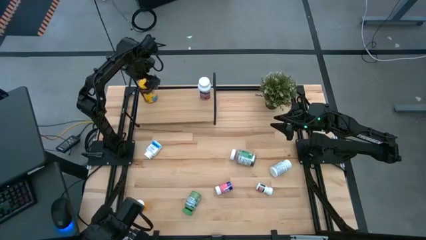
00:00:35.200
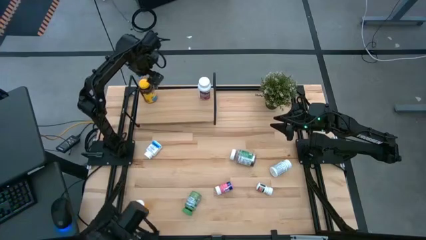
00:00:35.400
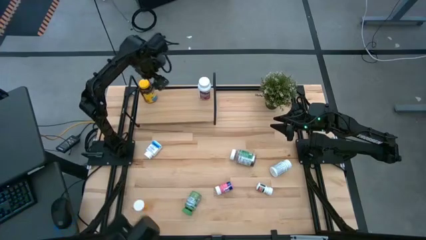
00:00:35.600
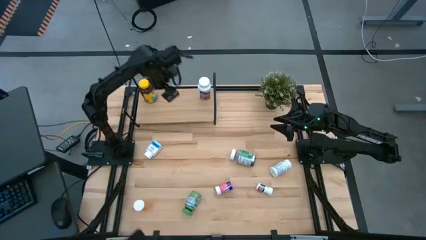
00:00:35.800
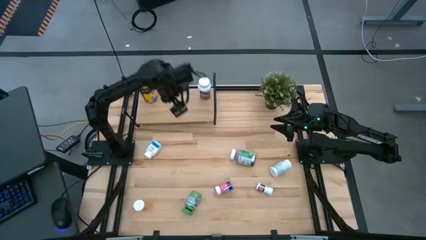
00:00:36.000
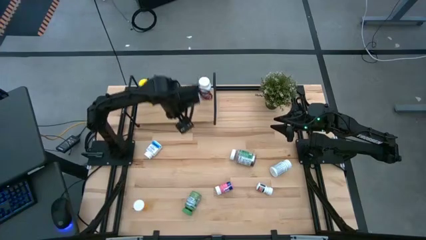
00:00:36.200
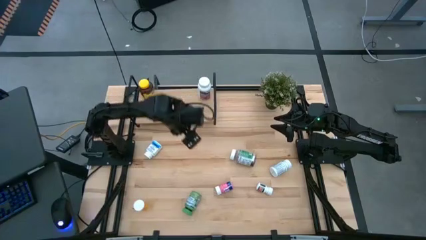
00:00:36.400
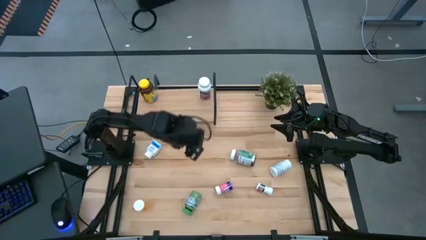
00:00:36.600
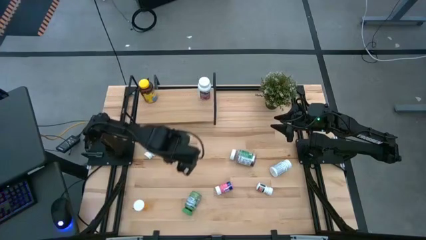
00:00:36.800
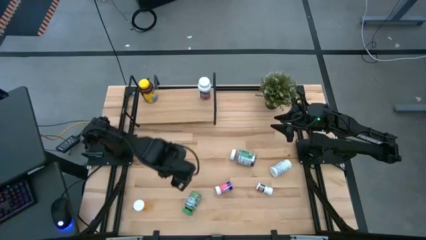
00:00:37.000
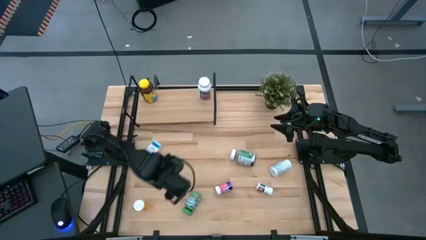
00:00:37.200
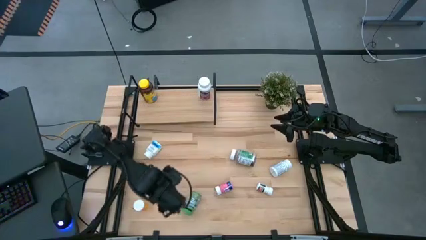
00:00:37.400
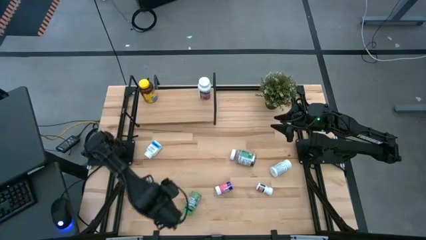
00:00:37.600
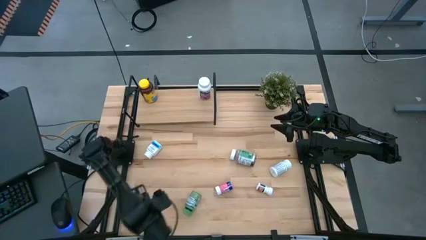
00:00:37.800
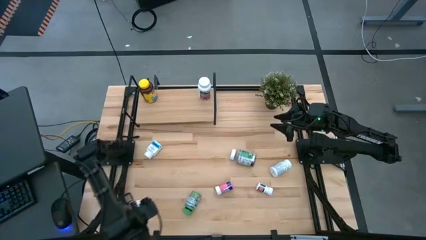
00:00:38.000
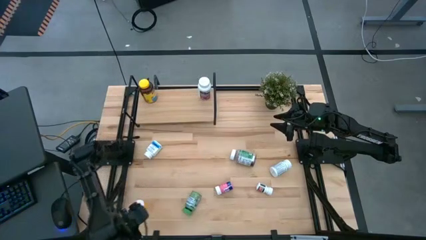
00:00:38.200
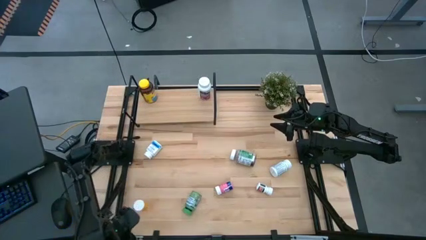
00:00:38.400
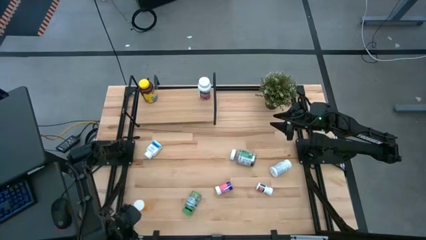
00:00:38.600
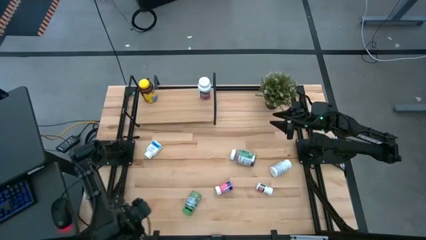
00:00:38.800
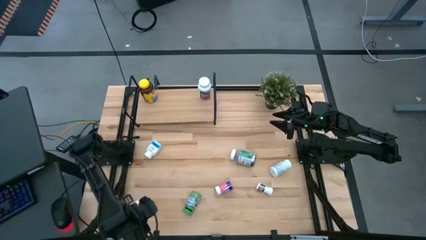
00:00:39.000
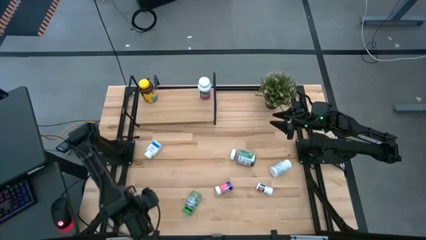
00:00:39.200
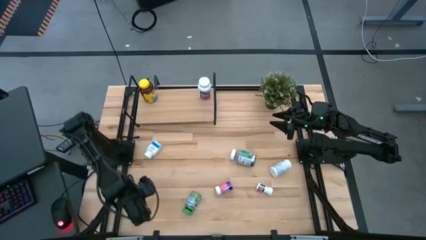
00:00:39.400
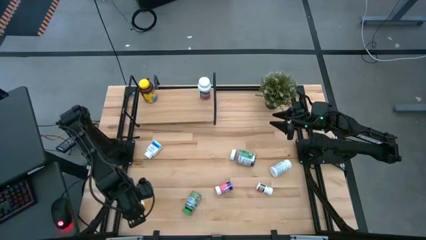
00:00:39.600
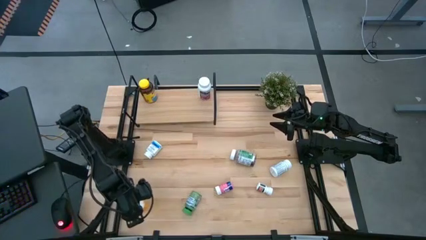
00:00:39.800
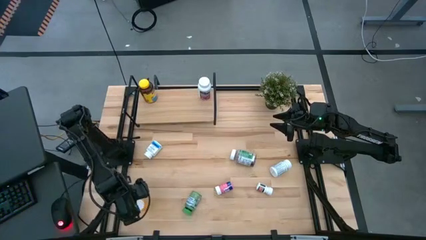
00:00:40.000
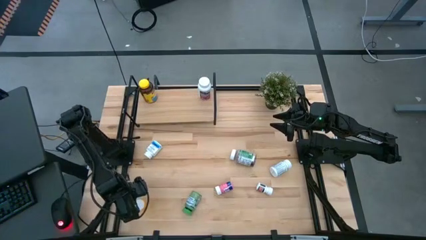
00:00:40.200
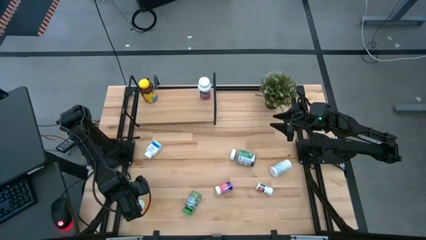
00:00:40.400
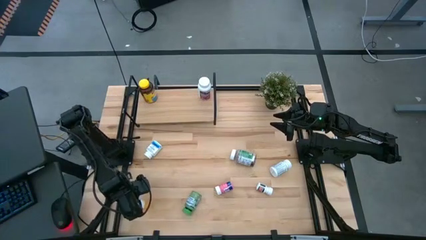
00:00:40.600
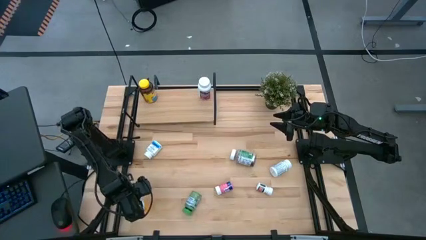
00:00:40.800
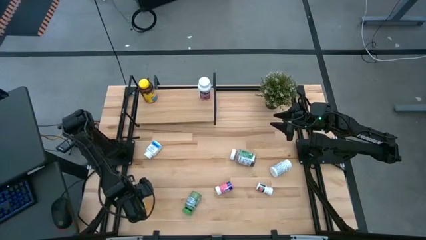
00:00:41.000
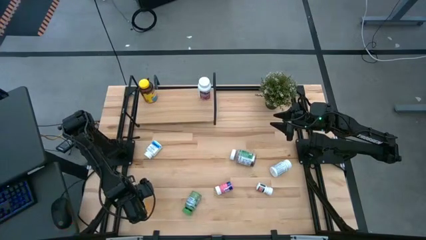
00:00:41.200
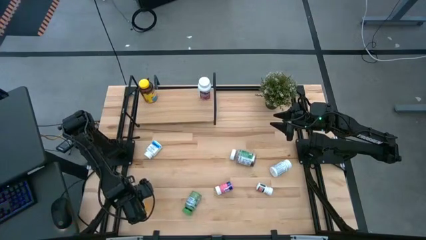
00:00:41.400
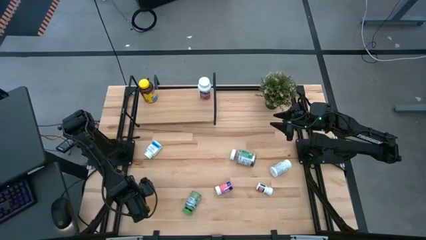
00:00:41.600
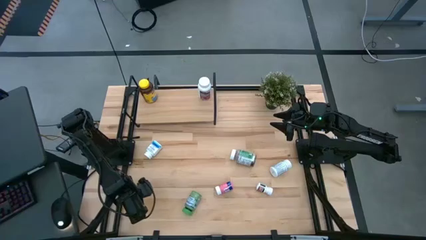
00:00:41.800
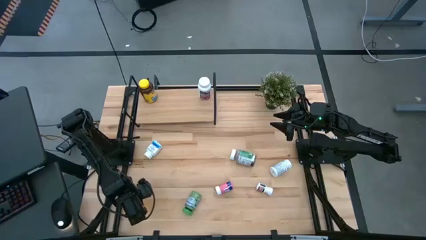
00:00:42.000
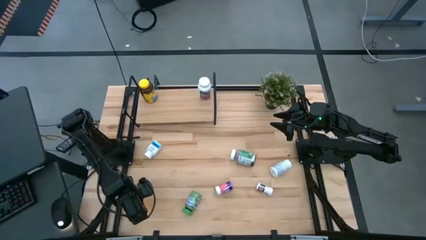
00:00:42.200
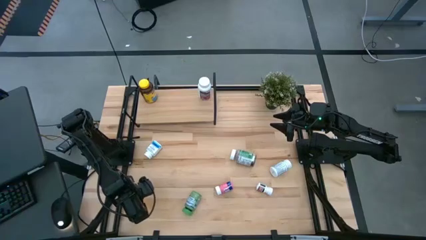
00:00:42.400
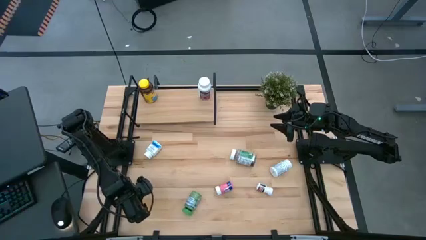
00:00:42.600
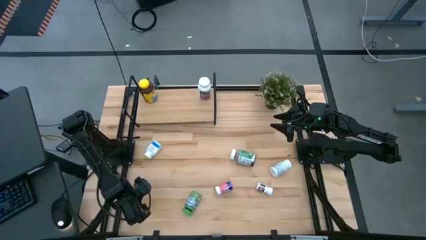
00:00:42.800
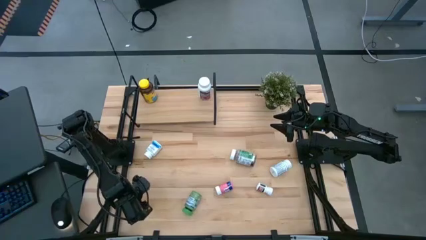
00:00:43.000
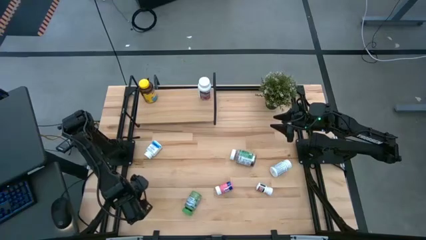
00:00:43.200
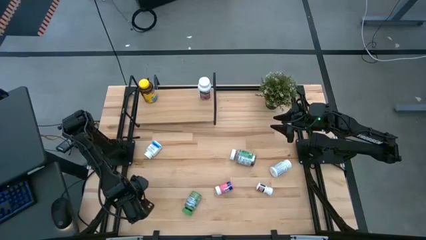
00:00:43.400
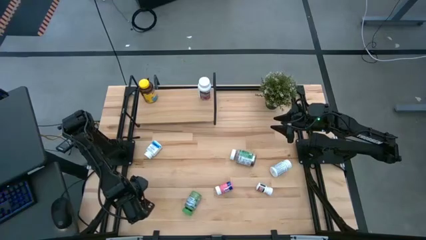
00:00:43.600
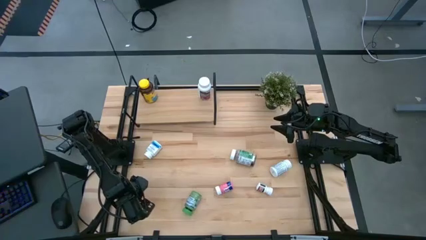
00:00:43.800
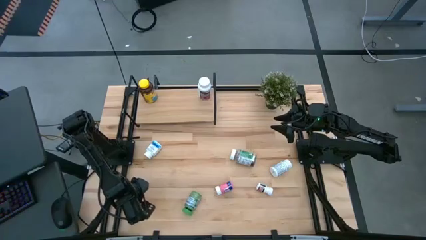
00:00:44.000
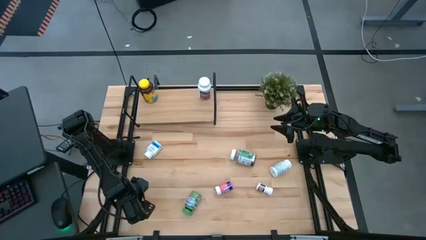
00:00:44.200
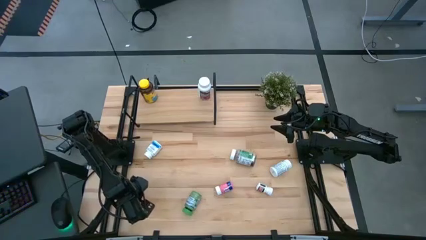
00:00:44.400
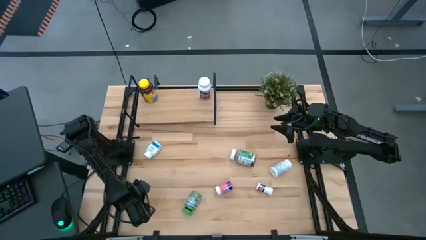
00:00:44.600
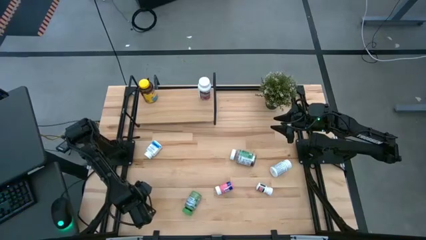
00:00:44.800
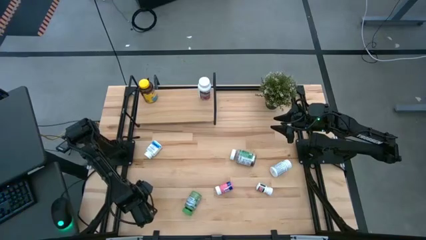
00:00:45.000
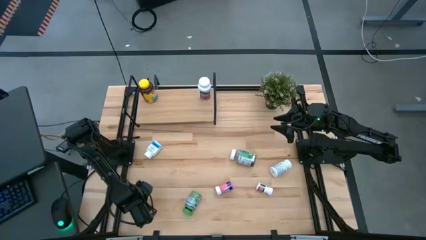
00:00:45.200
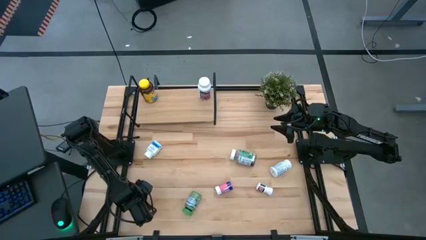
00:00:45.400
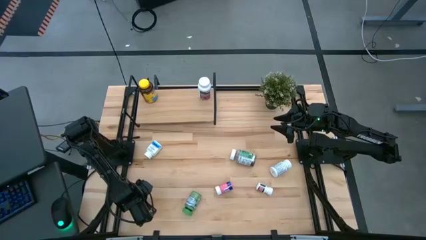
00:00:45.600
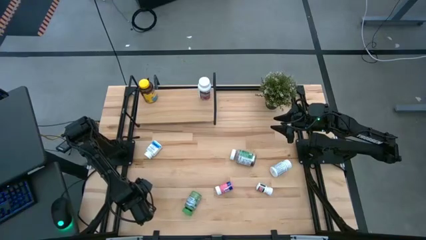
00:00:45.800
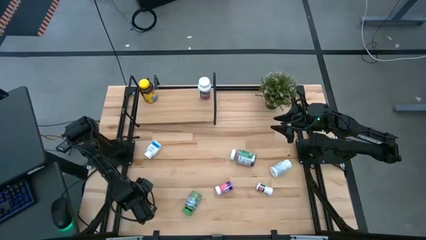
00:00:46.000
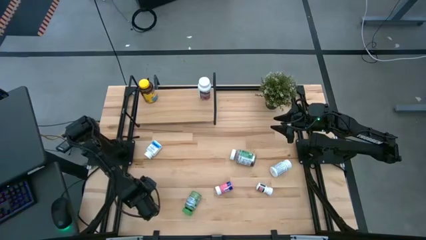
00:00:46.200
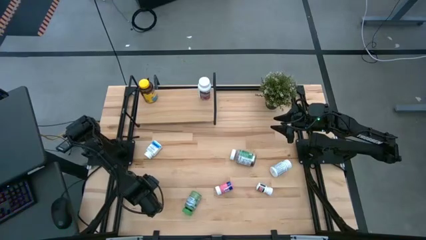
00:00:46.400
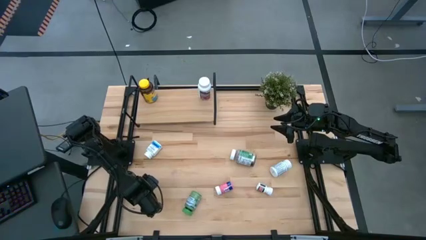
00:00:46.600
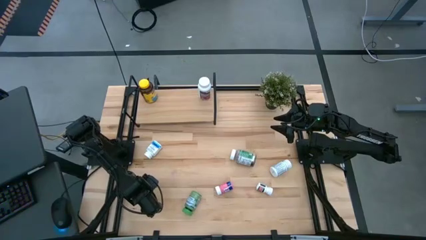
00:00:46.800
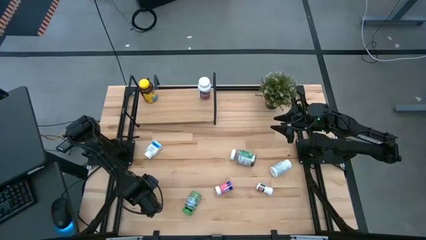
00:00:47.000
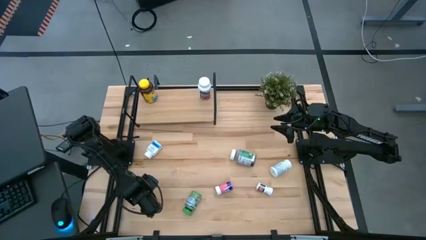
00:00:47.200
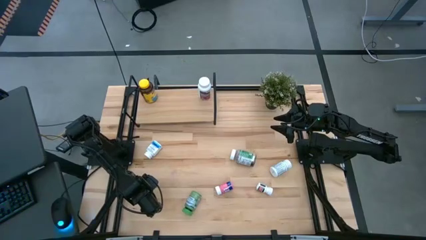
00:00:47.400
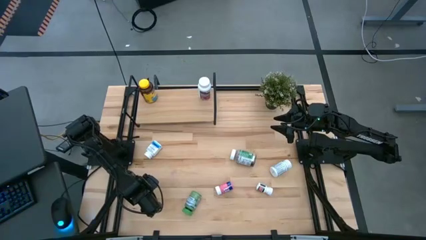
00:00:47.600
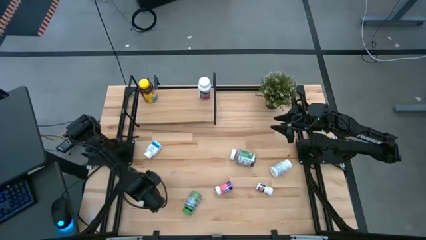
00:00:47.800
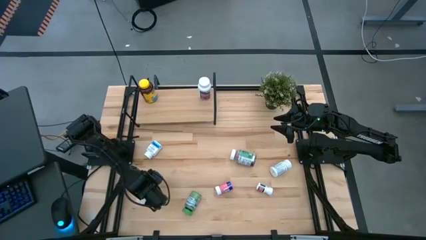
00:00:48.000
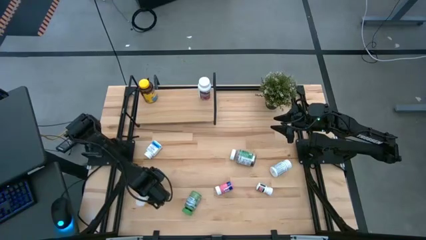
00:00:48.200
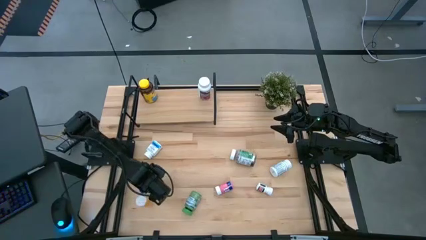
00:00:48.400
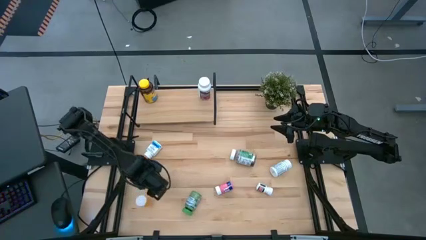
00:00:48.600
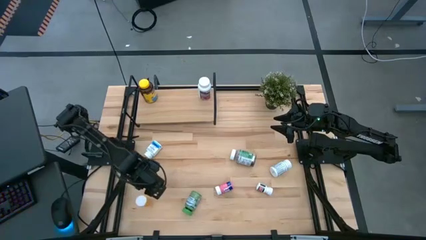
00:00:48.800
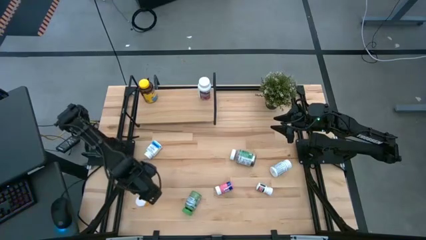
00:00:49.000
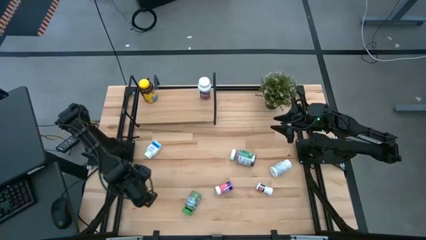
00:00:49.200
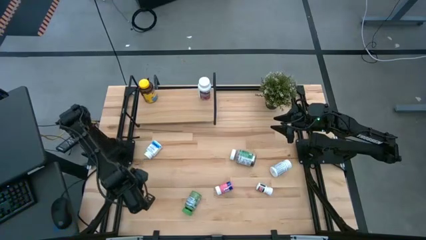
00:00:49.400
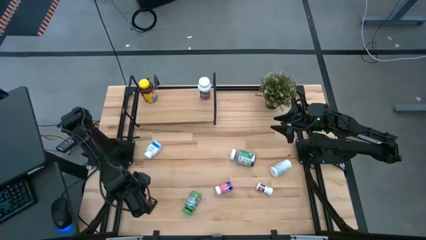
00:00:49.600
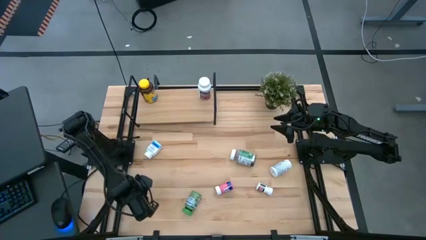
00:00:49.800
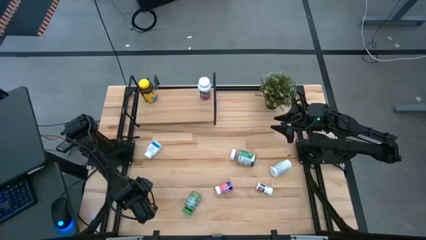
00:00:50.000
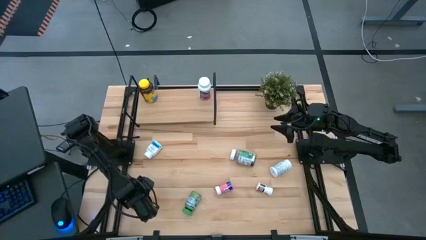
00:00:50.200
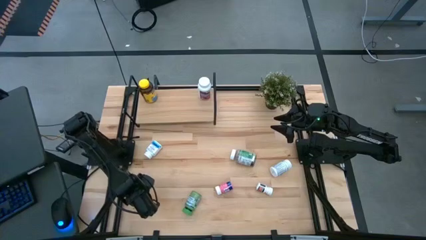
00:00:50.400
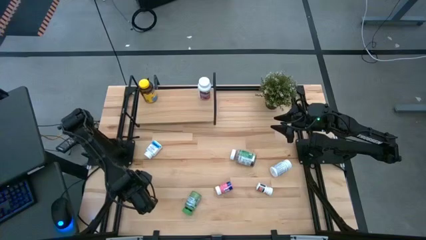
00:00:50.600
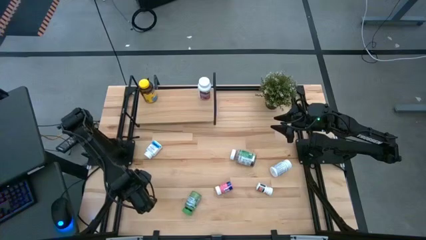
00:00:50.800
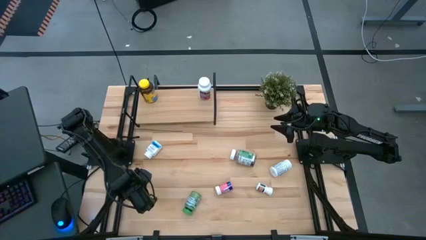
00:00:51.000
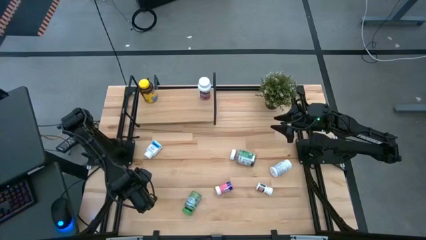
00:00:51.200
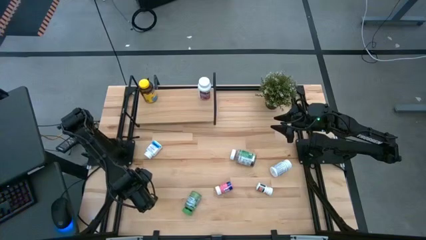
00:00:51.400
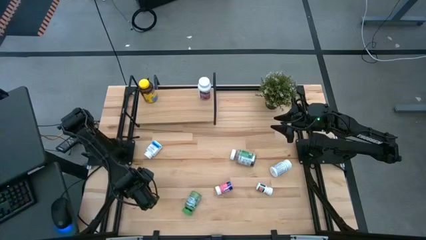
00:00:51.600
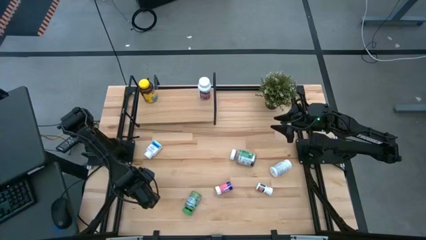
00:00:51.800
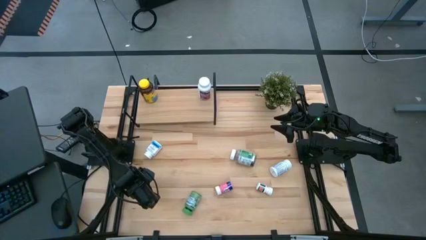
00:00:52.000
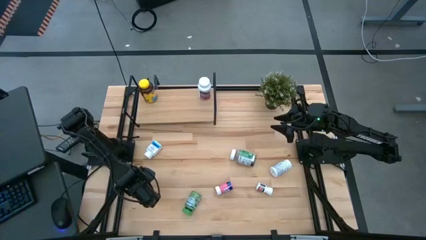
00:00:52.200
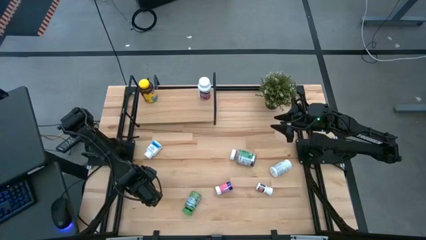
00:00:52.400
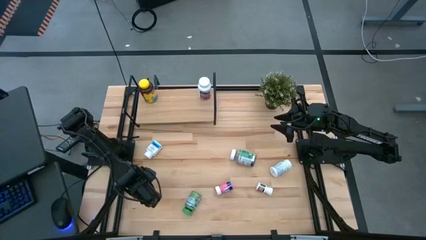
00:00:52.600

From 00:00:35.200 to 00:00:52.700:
Task: Pick and place medicine bottles onto shelf by color
Put the orange medicine bottle on the shelf
